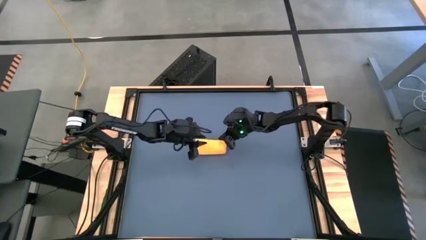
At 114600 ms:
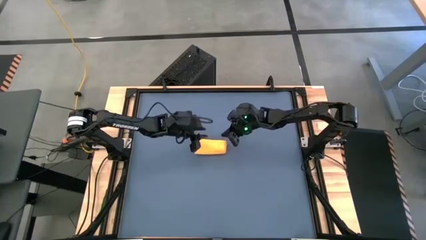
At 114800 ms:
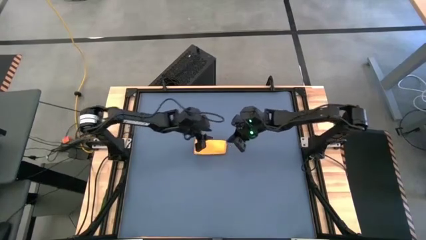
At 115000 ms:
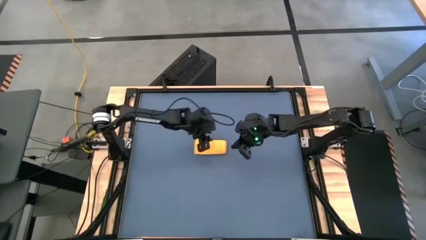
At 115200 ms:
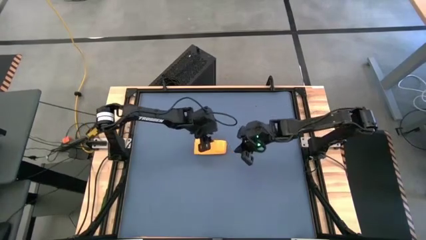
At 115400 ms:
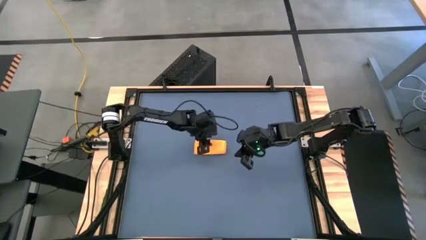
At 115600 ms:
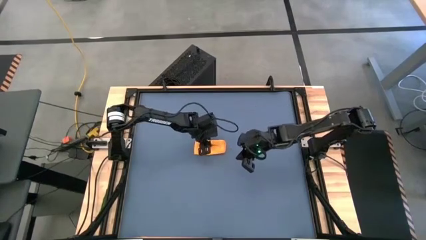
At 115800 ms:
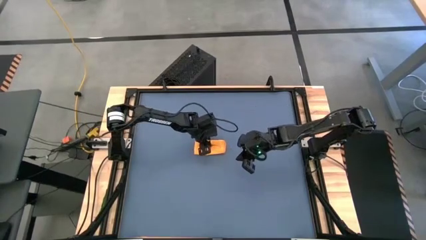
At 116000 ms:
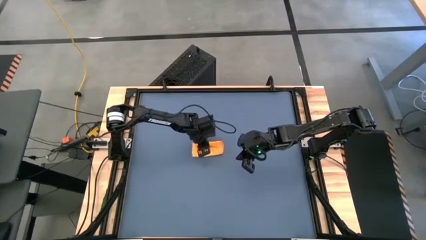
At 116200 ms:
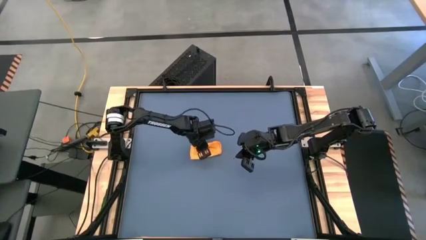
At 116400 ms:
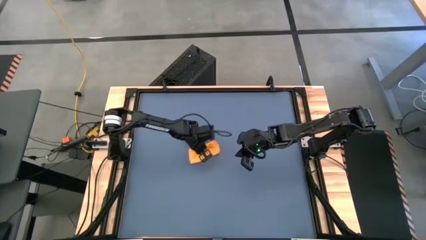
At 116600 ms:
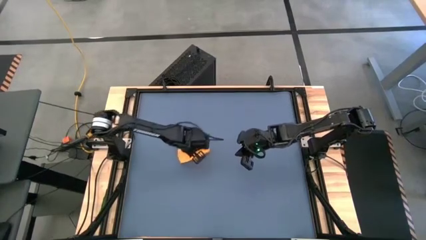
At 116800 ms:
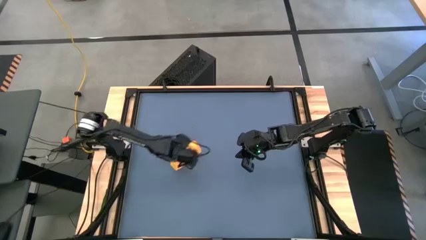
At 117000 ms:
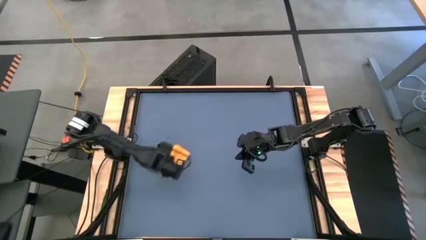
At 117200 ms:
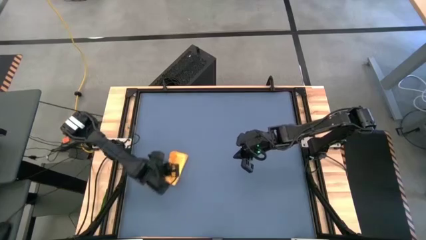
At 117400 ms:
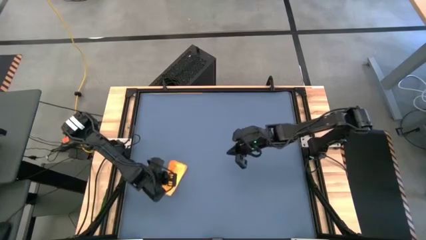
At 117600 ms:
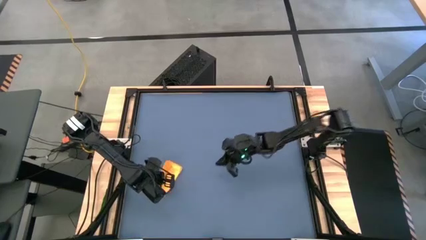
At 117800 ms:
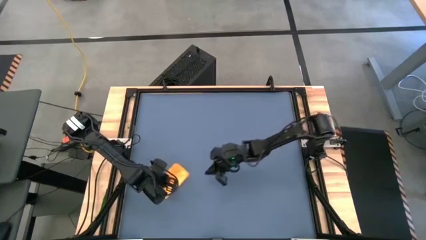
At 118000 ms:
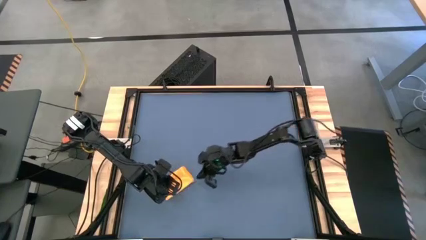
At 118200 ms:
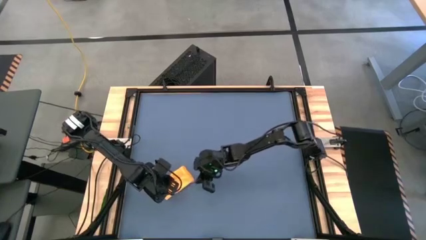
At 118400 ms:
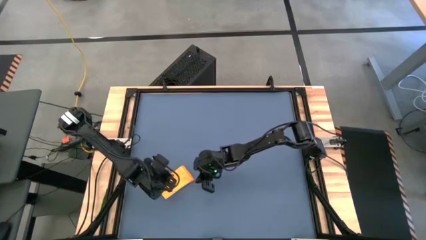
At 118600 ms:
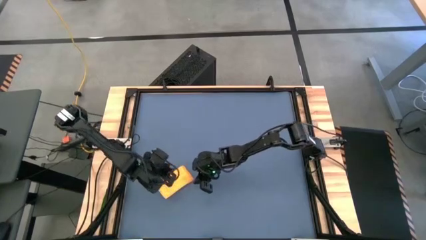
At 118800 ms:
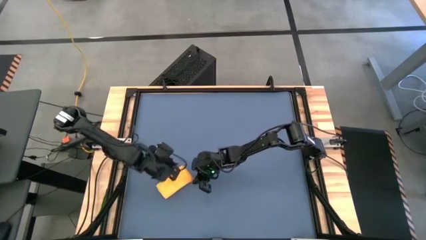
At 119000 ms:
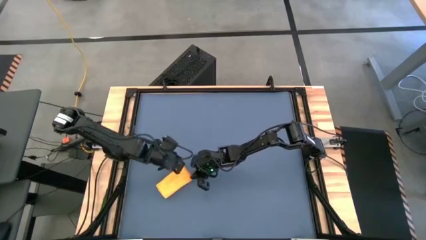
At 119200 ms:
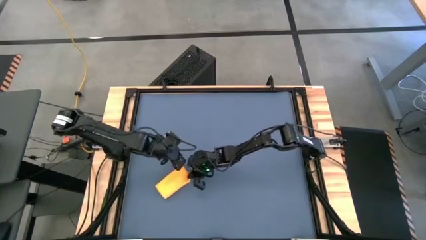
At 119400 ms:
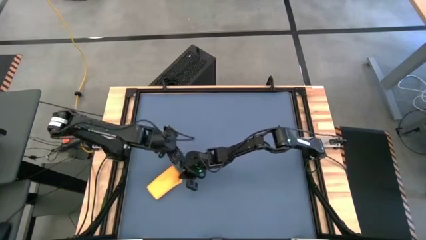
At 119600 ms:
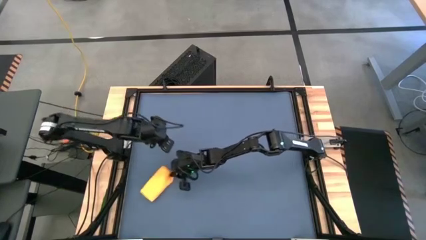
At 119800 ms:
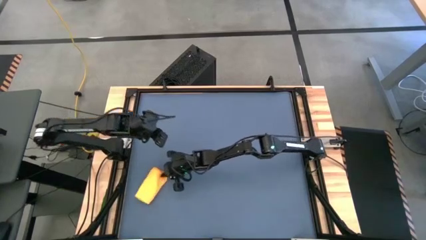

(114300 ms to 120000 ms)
Task: Roll towel
Move the yellow towel to the bottom left of the table

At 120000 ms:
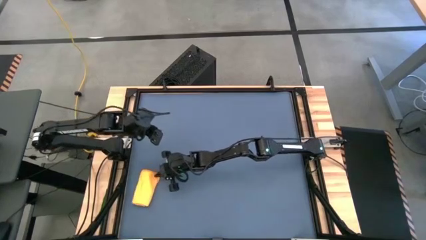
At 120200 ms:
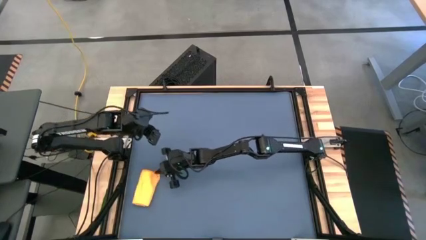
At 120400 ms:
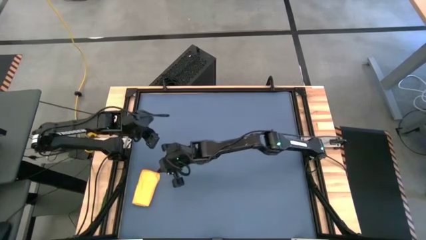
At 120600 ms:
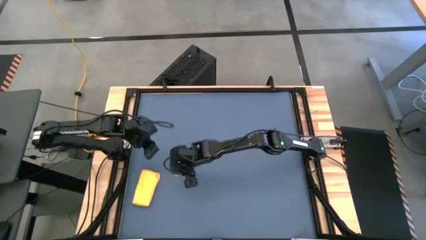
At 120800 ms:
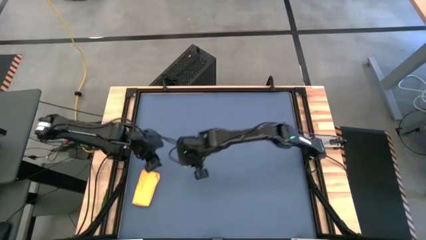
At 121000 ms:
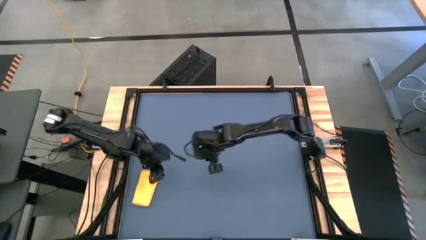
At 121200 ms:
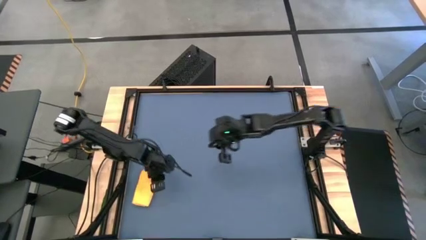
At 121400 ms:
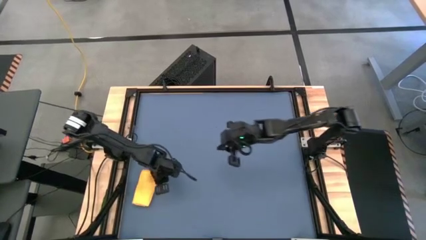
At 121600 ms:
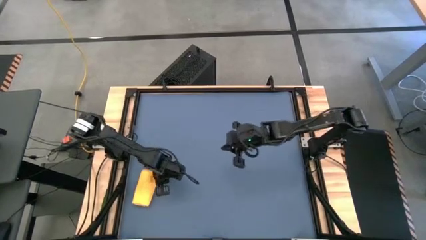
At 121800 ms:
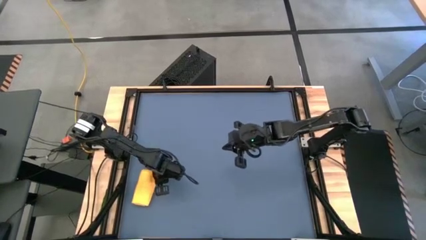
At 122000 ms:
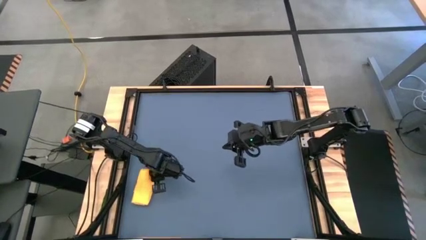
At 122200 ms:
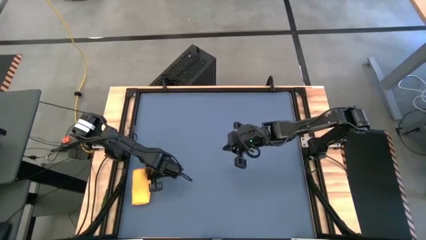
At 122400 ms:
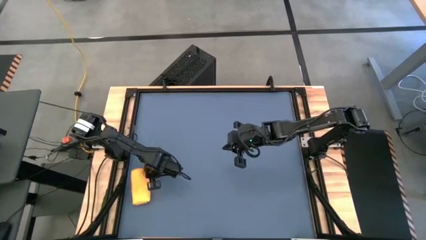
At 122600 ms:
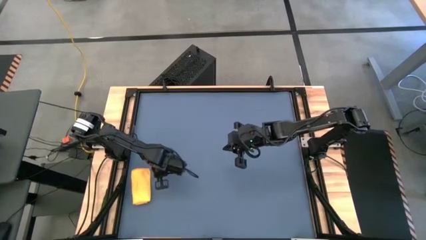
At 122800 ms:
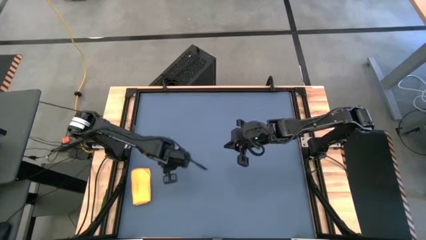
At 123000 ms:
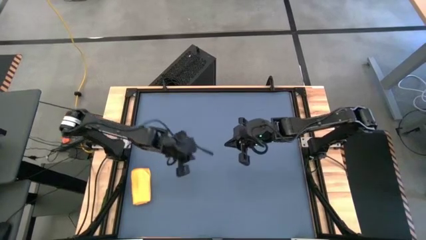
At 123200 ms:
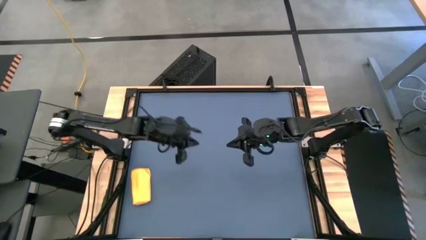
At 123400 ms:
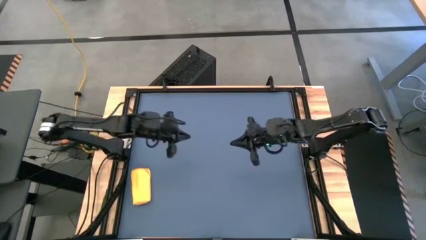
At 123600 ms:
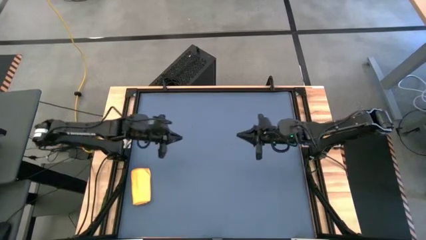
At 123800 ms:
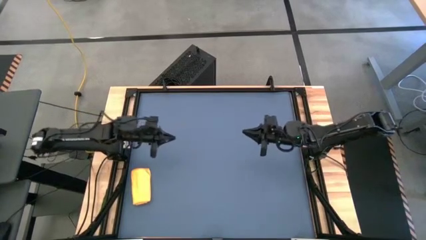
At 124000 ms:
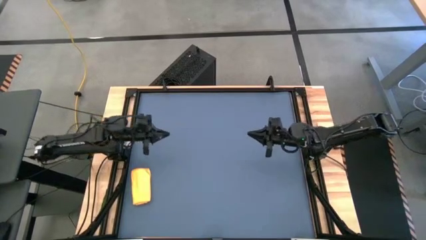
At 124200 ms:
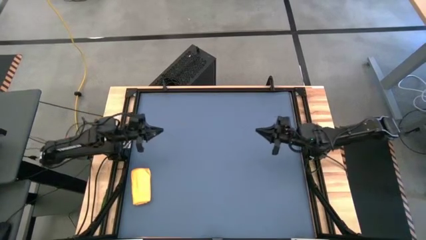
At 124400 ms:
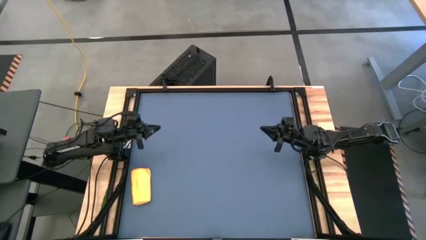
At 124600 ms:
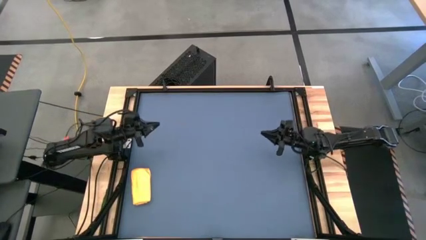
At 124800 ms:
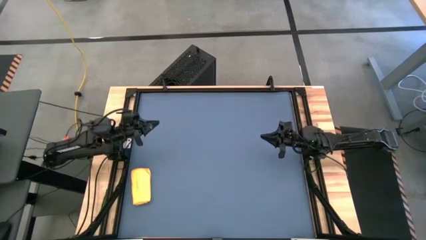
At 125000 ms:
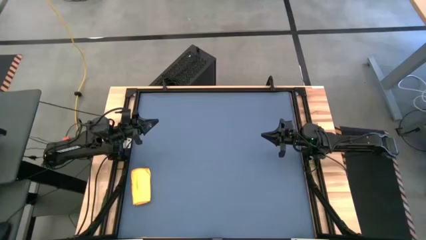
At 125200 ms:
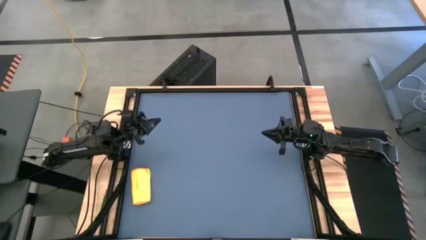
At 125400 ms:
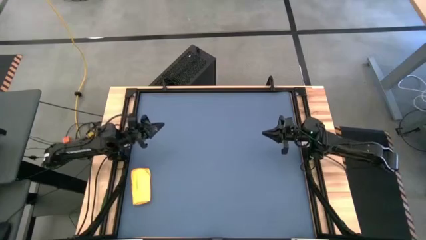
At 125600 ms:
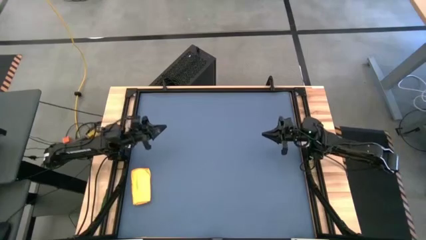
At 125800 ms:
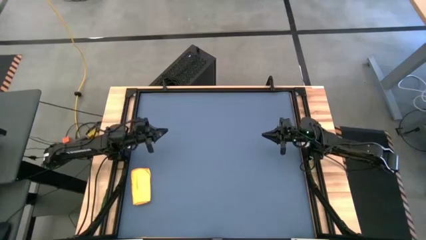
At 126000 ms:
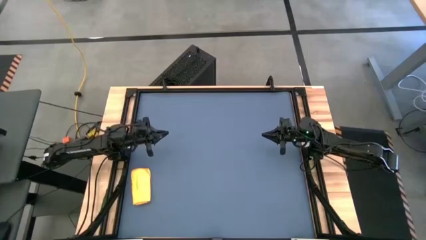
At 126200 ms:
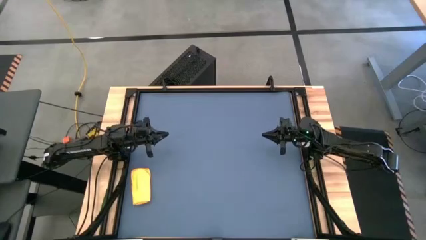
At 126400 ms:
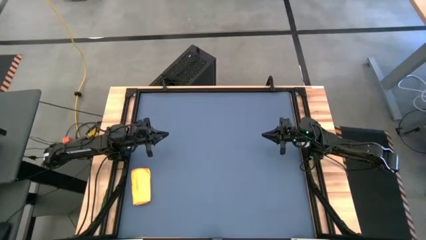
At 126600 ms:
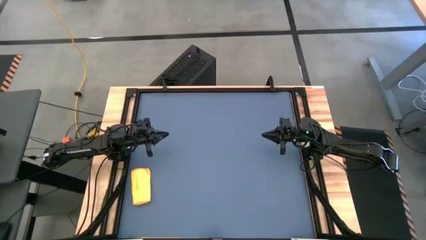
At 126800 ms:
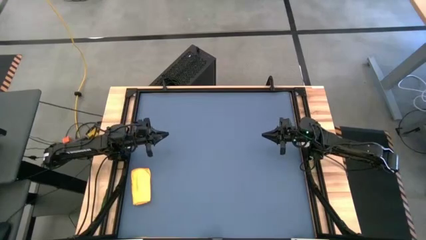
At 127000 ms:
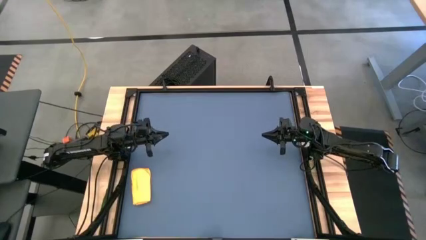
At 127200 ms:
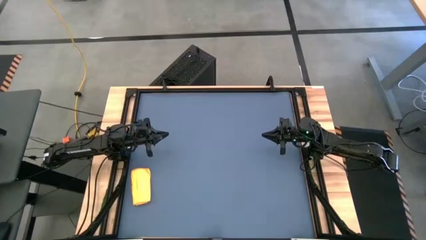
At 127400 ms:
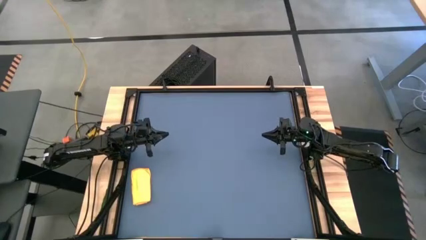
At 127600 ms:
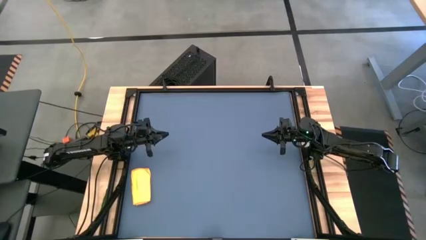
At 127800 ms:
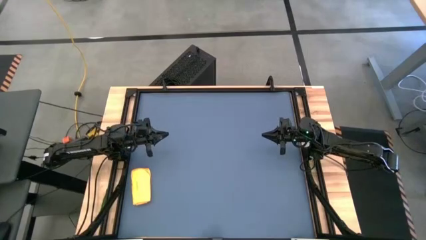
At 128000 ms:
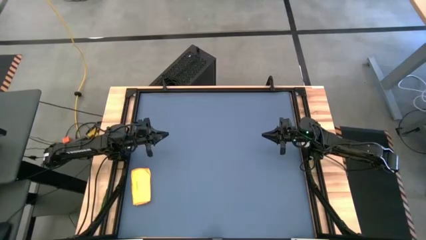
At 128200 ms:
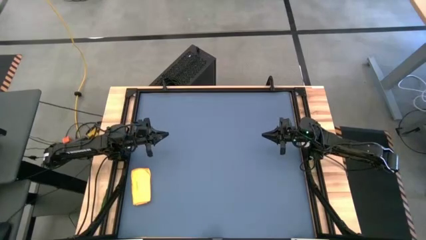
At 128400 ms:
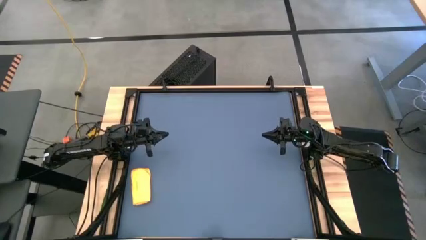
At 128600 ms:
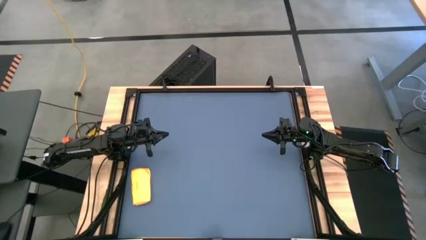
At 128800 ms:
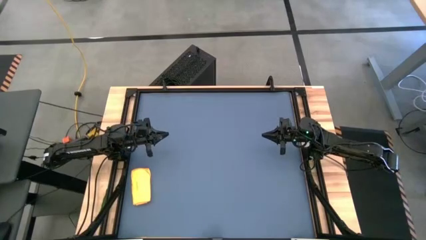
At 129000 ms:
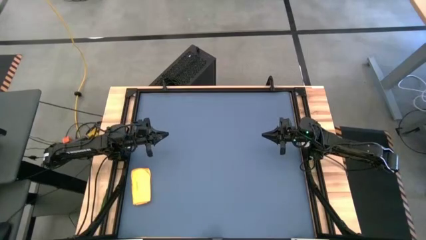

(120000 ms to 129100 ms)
Return to Home Position

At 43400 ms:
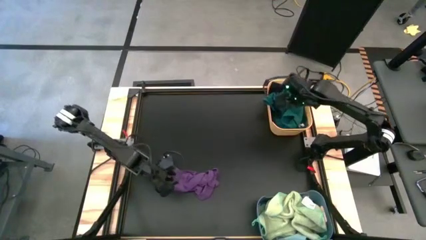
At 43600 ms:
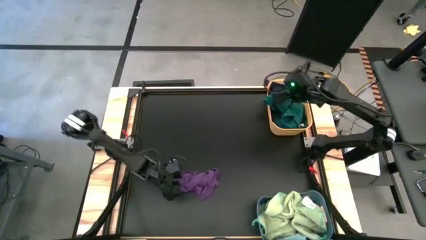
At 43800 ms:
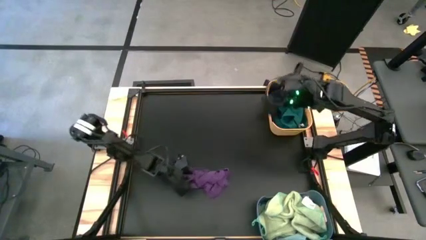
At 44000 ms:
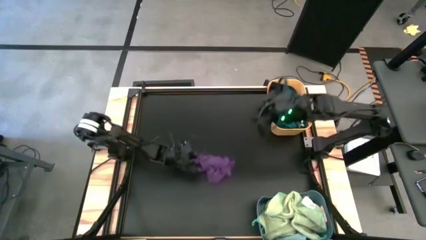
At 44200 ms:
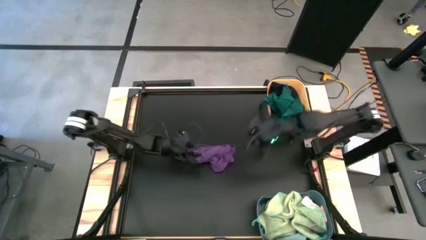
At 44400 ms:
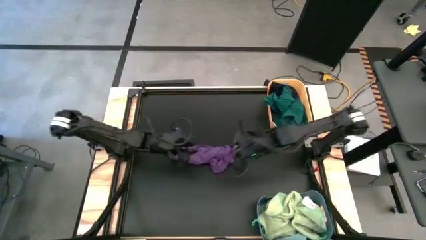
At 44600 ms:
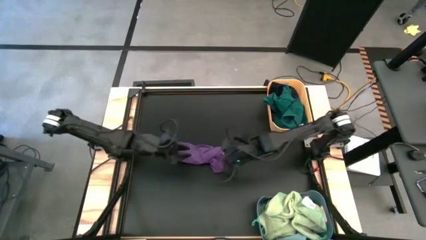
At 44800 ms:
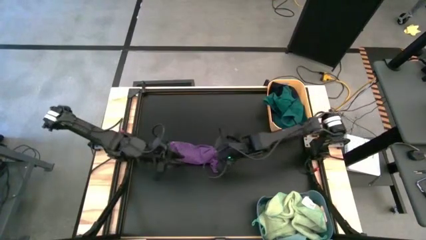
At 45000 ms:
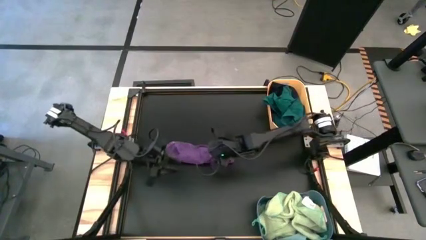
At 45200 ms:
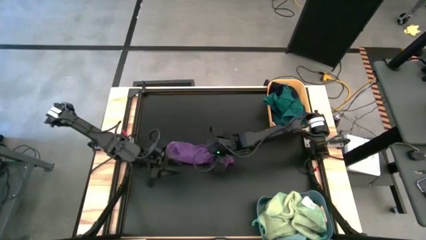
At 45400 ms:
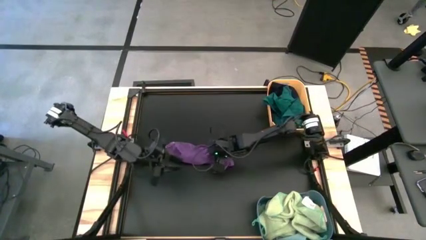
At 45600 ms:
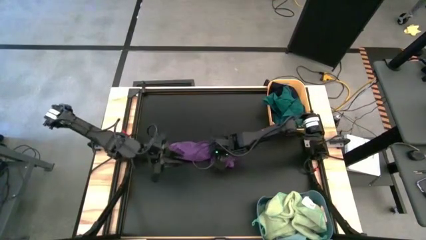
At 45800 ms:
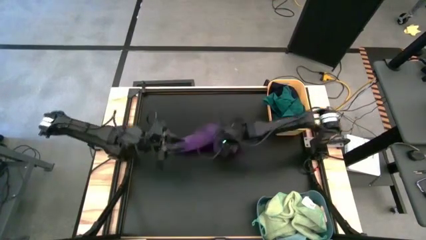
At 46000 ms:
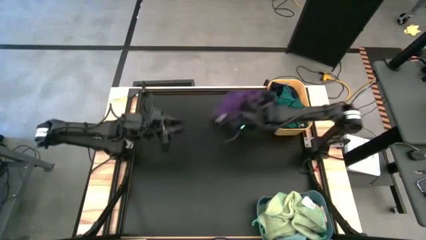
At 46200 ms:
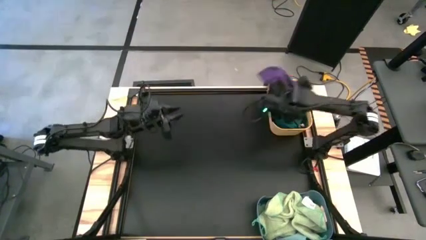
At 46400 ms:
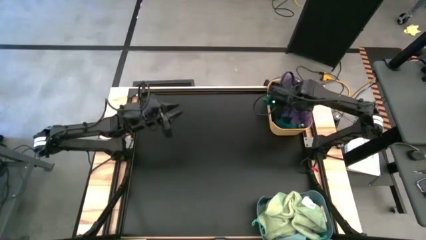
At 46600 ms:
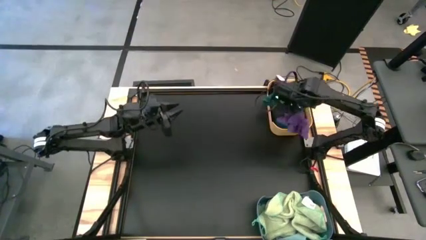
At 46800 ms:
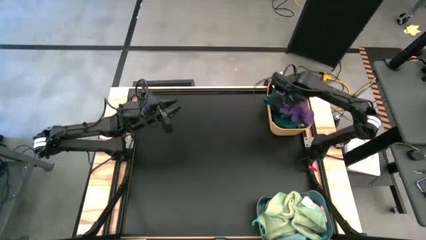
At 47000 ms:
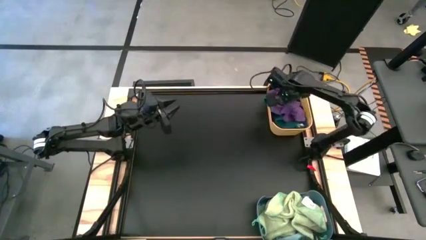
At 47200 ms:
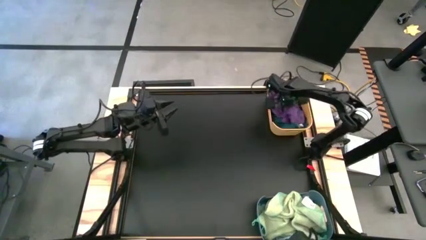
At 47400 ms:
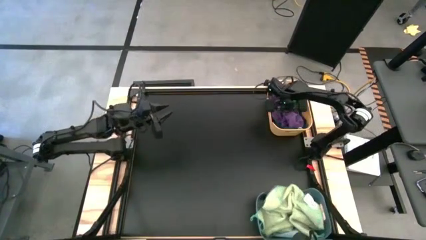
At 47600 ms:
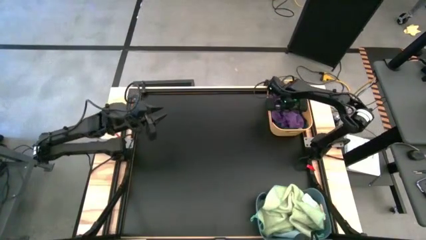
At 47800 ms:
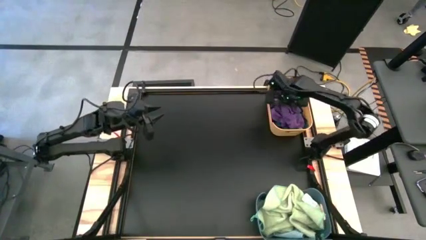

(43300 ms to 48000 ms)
Task: Sort towels by color in basket
Put the purple towel into the yellow bin
